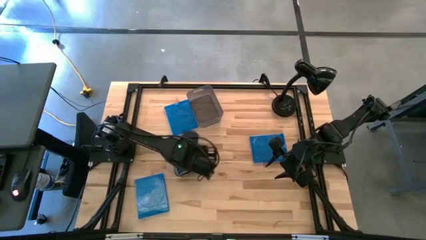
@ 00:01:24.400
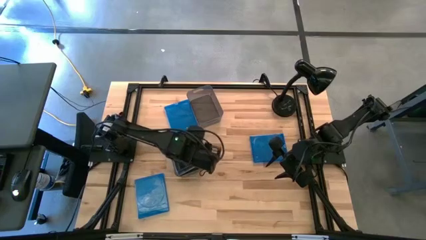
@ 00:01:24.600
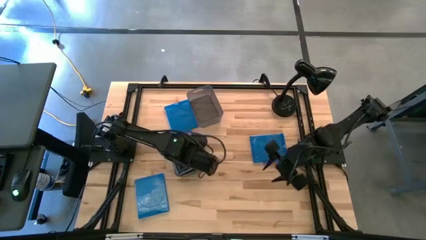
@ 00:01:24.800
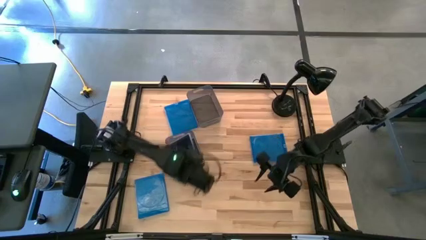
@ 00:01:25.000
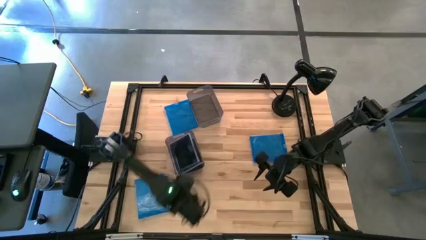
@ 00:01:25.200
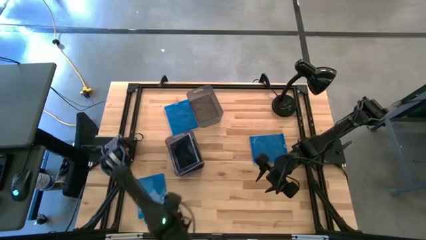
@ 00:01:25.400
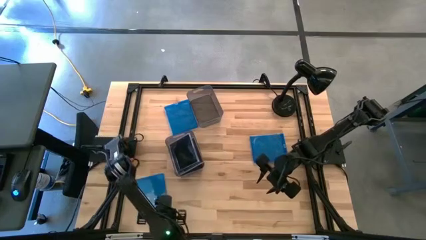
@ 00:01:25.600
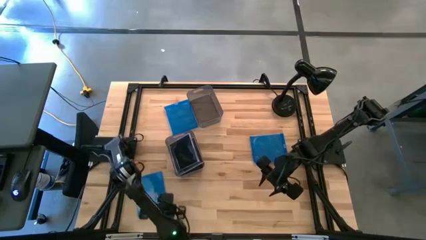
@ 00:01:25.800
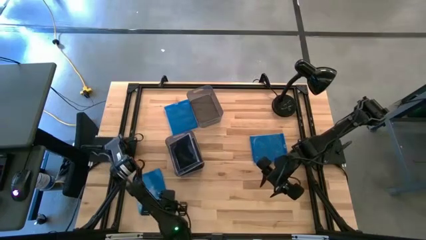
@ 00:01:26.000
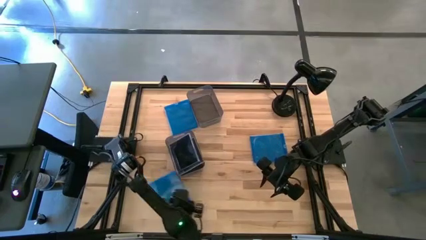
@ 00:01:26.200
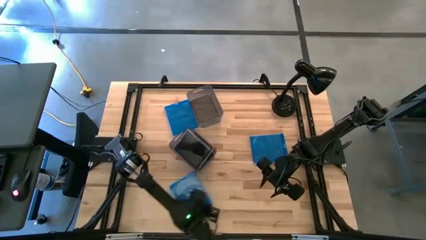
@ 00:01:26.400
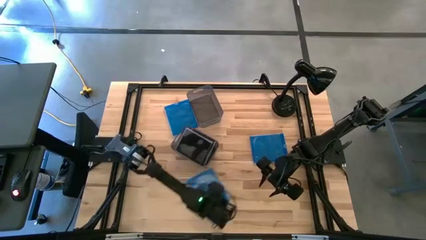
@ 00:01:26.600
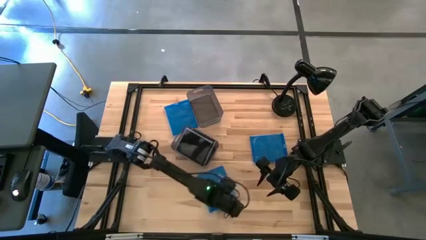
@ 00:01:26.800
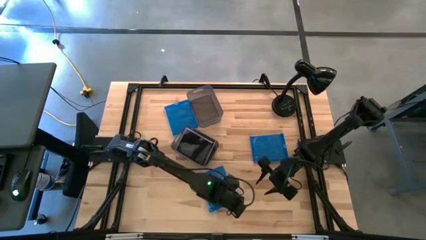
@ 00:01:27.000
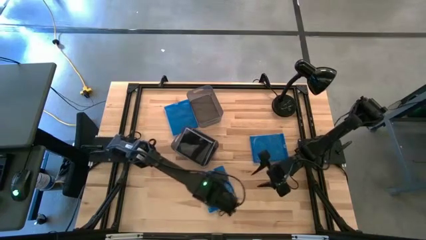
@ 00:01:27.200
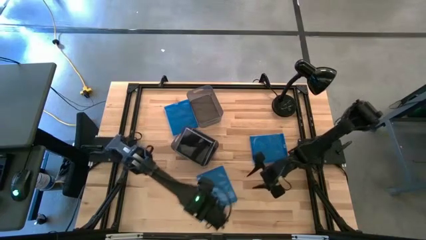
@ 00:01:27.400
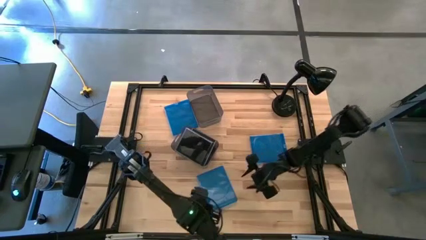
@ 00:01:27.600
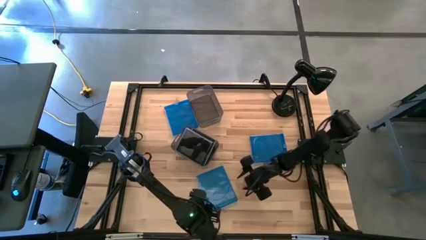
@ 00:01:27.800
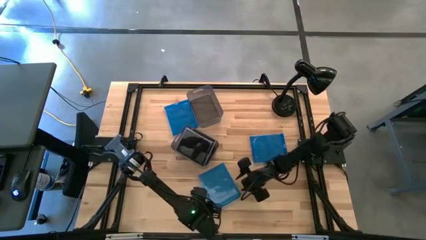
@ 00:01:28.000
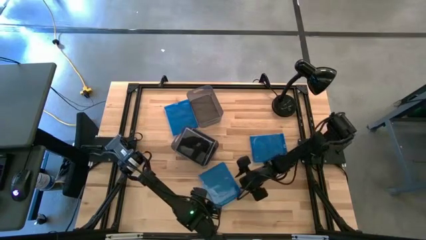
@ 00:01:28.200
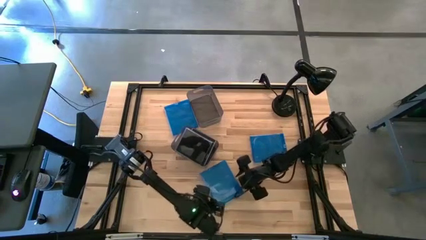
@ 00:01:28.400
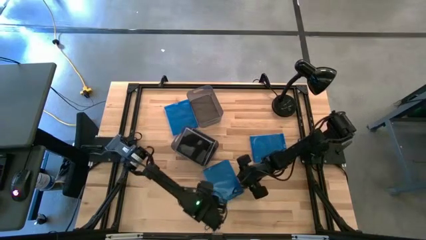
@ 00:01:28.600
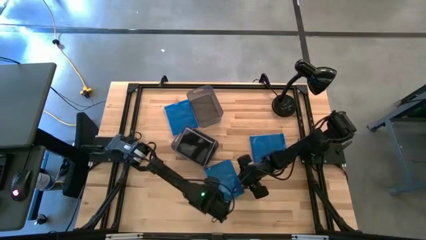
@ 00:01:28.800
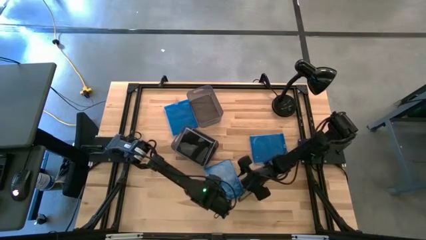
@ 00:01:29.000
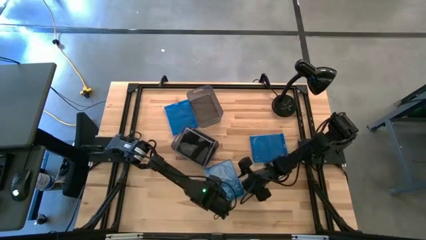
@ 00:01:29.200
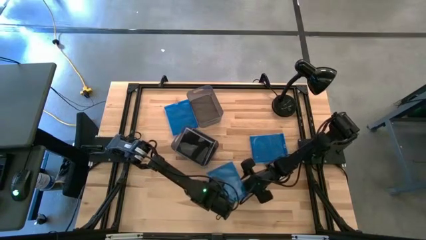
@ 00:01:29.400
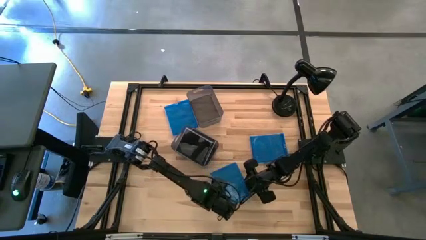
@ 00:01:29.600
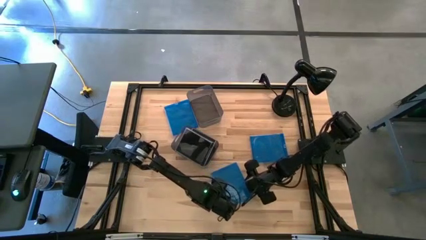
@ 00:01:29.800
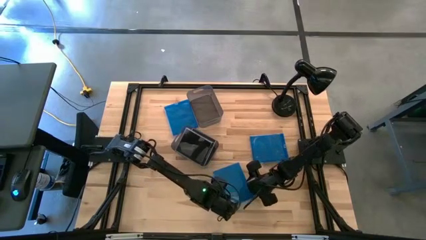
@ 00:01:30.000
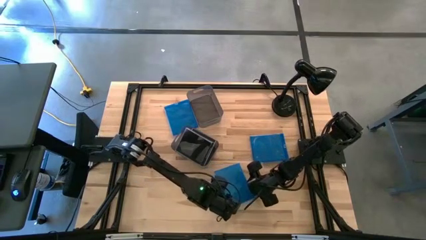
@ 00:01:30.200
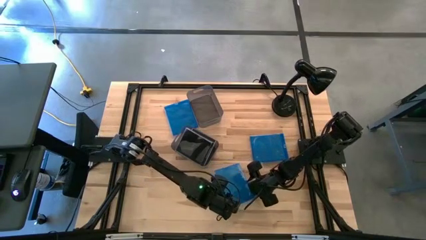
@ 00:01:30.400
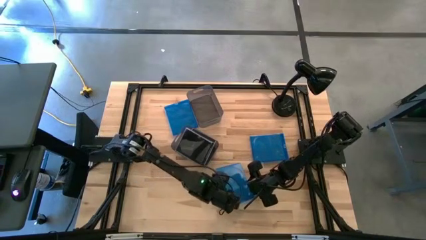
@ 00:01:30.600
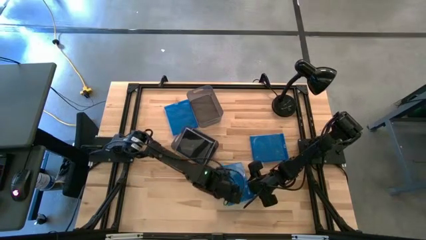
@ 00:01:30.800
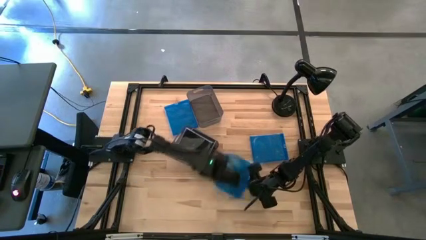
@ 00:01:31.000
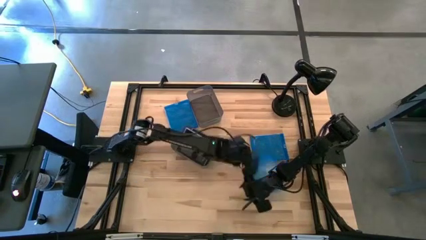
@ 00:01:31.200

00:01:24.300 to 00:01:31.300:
Task: Pick & place jewel cases by type
Put the bottom left blue CD case into the top black bin

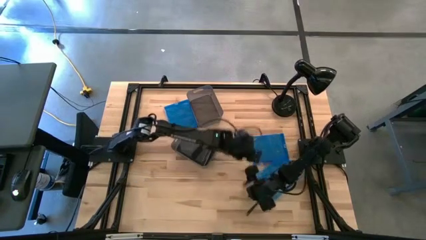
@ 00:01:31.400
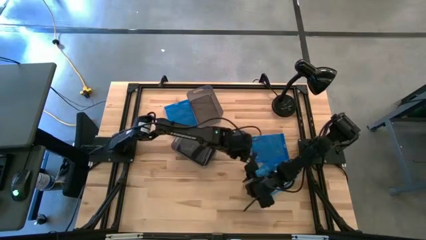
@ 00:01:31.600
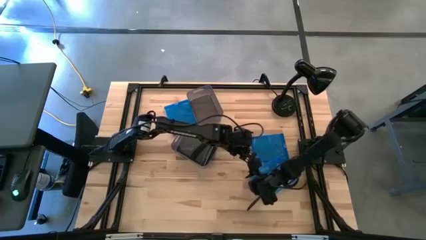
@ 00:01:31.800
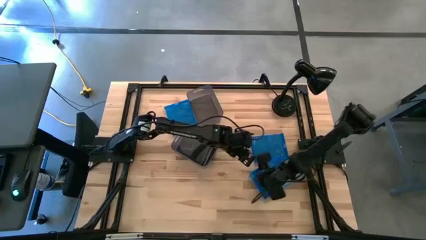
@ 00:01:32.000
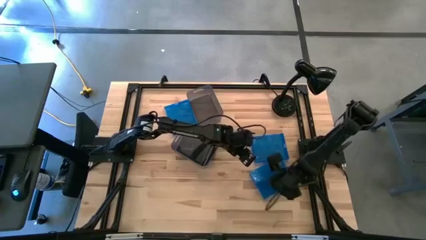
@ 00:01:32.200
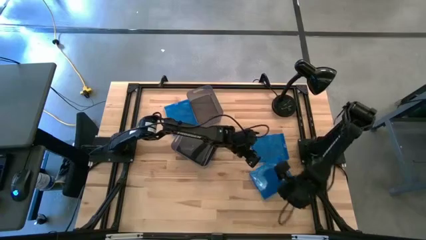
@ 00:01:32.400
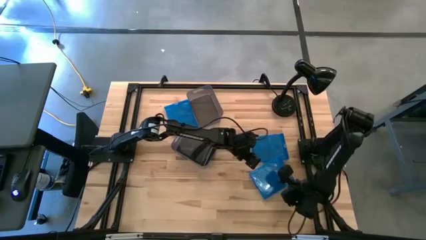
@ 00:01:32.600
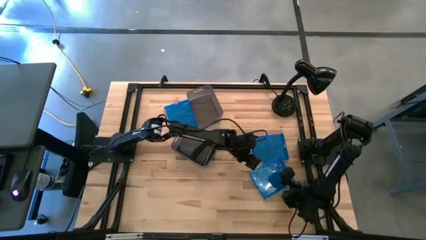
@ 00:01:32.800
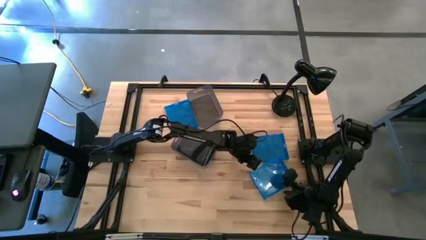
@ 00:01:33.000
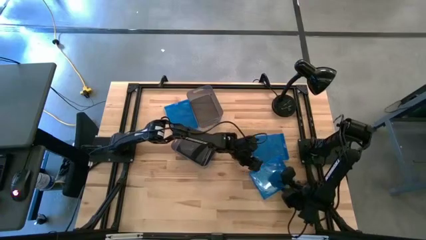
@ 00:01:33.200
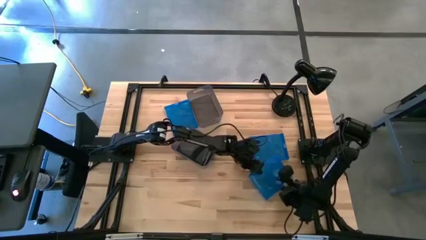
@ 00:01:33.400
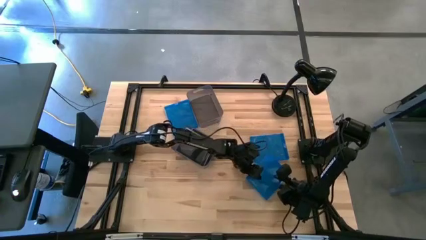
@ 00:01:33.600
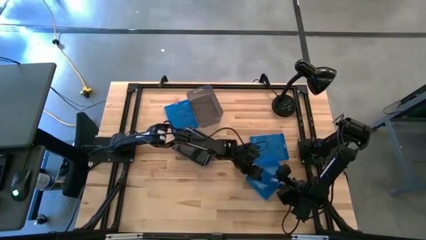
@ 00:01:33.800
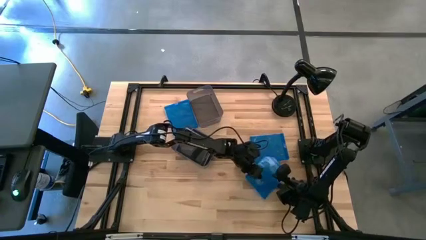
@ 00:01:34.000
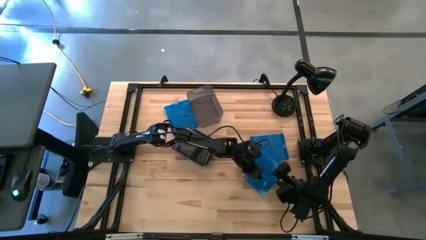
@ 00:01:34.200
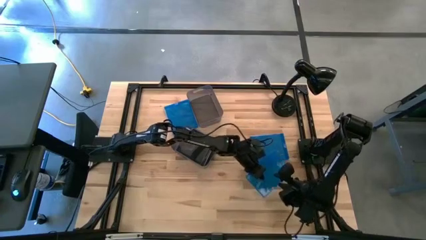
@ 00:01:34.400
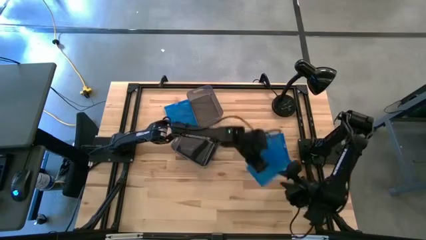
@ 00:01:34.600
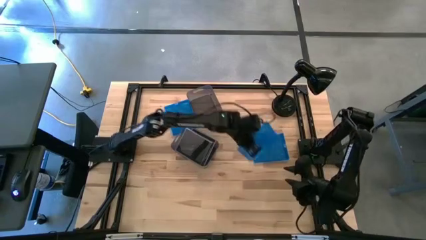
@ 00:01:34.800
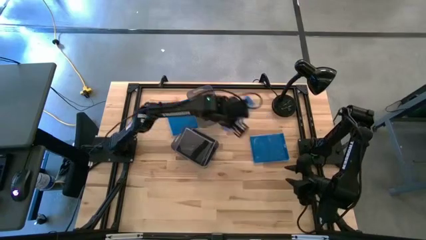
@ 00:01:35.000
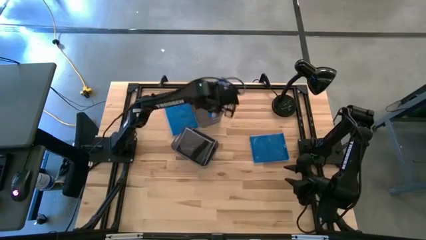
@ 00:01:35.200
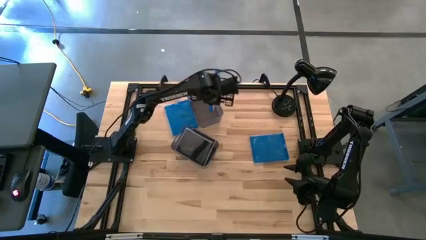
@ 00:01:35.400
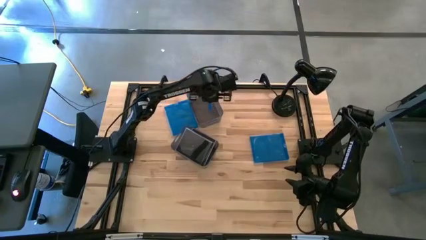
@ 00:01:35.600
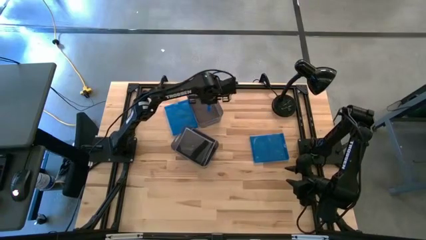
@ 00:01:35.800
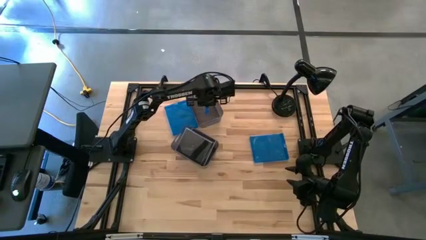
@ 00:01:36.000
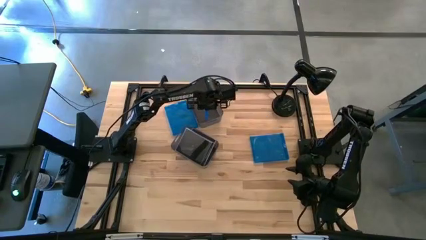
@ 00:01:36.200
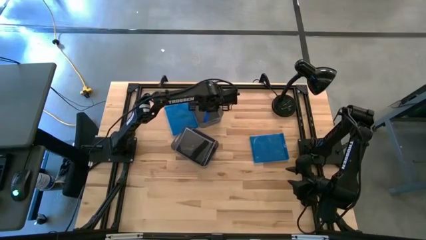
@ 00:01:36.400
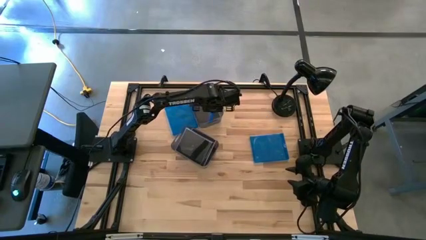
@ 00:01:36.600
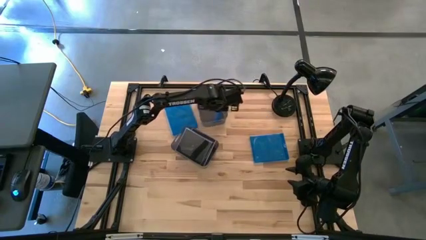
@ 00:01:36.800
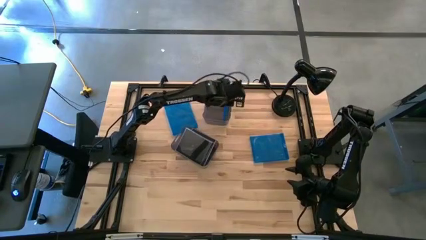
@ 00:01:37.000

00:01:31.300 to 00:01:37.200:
Put the bottom left blue CD case into the top black bin

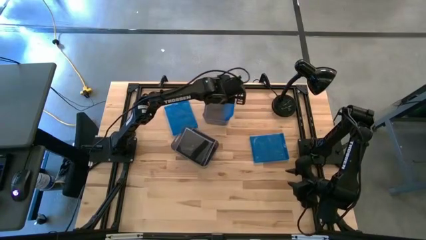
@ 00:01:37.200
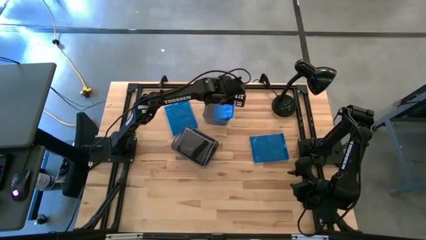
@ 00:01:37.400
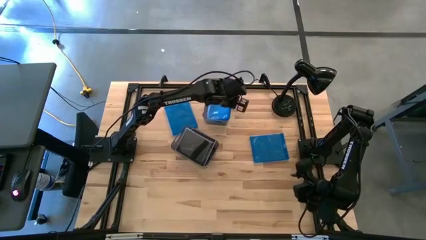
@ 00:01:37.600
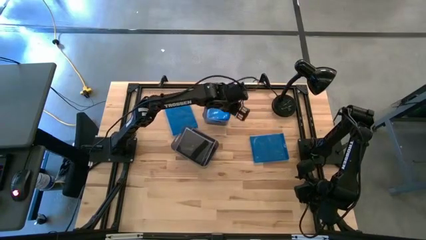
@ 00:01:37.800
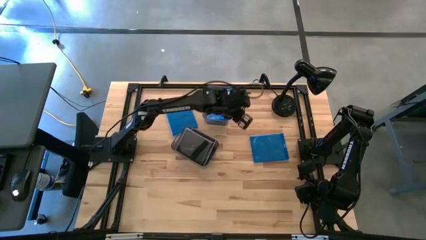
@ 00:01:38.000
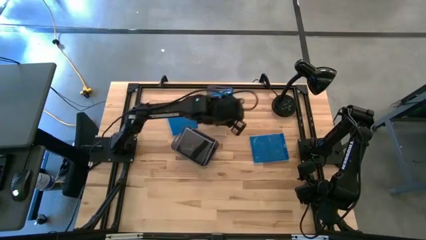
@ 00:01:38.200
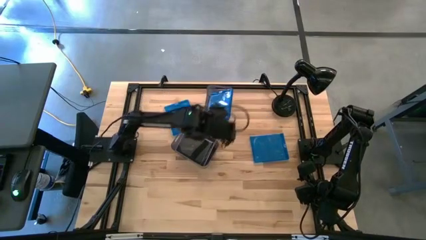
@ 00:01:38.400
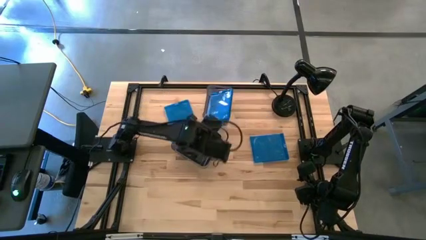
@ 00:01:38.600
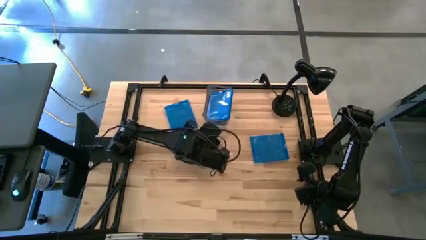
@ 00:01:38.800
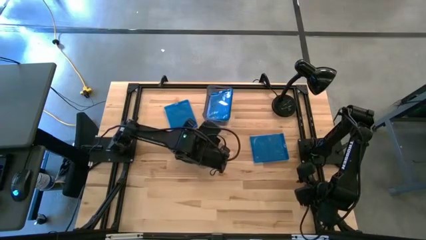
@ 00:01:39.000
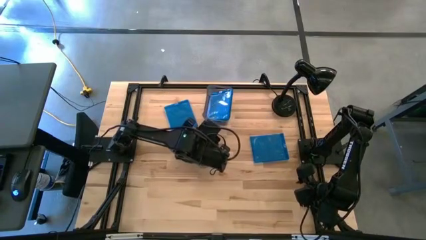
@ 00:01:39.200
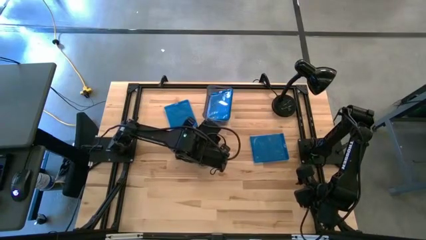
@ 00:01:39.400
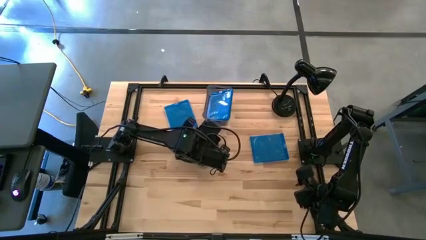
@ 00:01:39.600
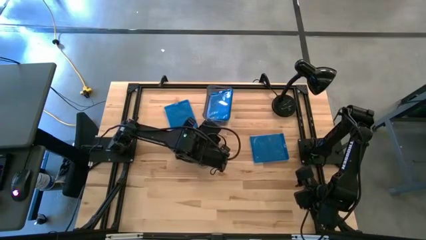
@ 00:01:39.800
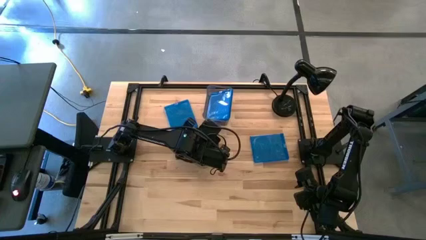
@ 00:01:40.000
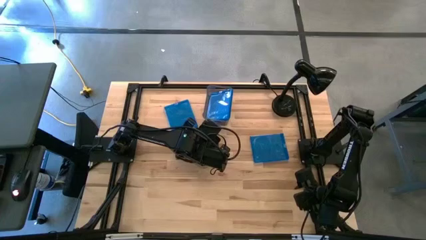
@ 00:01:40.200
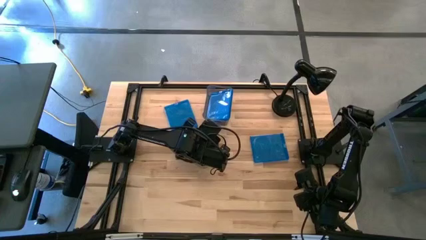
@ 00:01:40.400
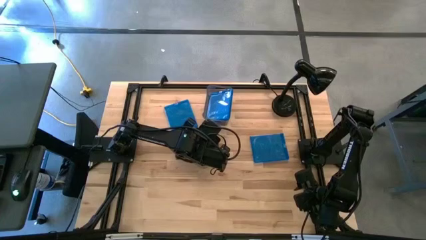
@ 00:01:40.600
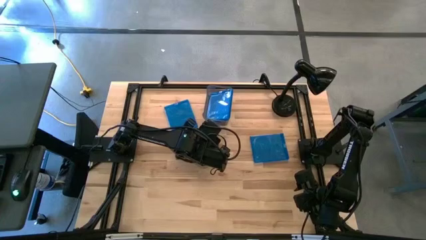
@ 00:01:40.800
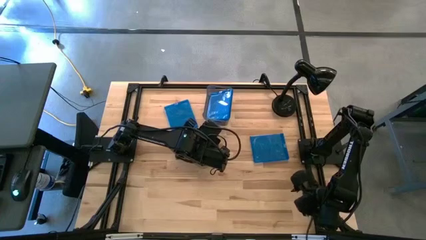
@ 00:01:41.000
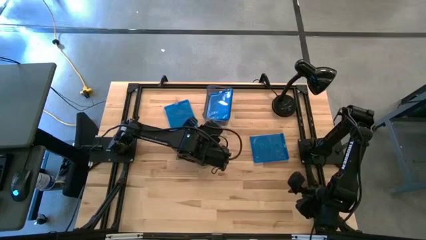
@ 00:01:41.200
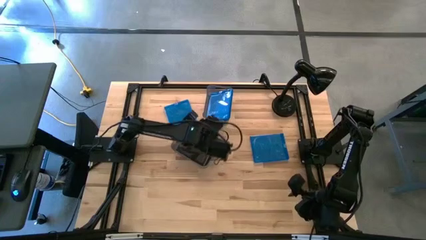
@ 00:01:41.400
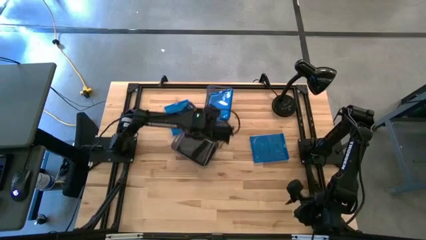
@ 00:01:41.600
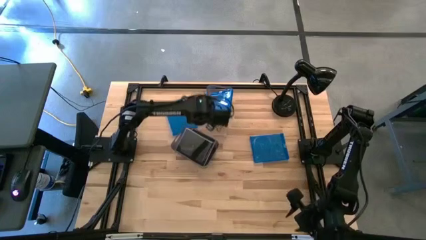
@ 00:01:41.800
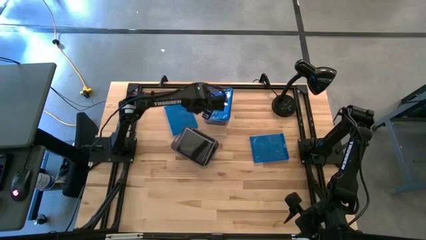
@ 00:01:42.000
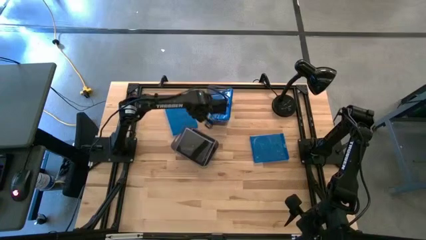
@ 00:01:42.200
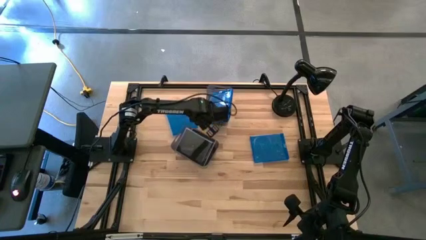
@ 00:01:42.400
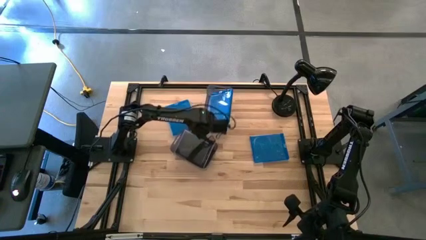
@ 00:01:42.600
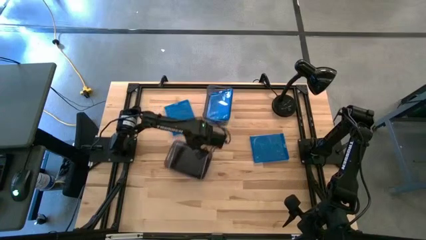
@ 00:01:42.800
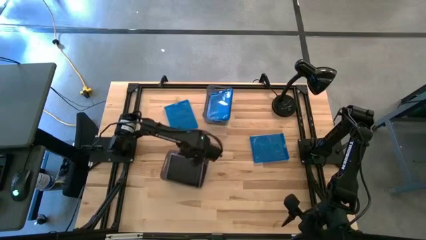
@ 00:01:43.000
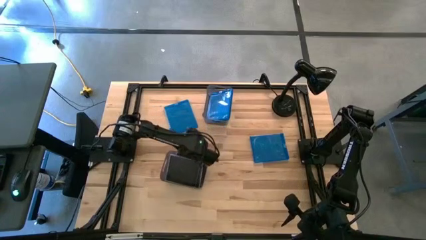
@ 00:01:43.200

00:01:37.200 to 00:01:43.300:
Adjust the bottom black bin
